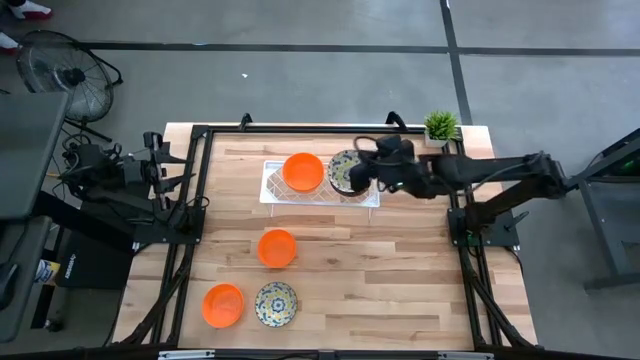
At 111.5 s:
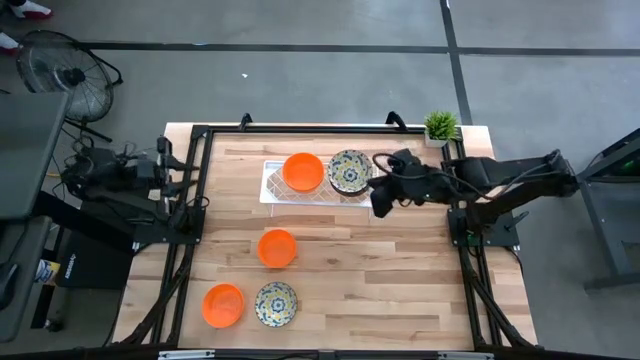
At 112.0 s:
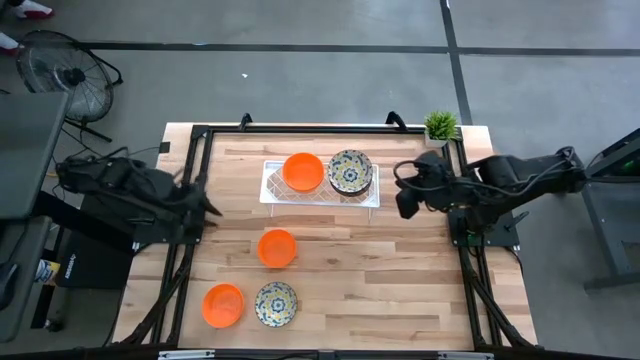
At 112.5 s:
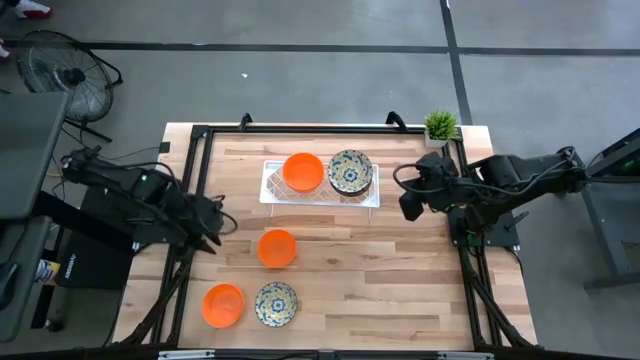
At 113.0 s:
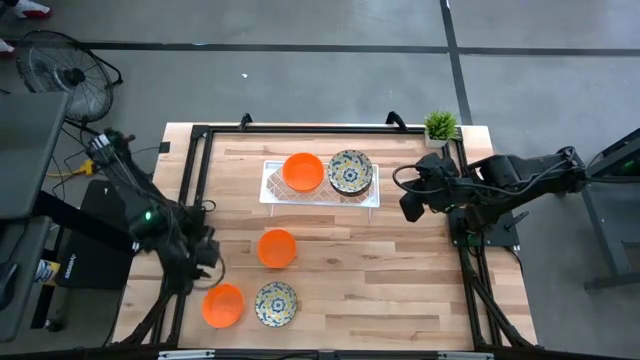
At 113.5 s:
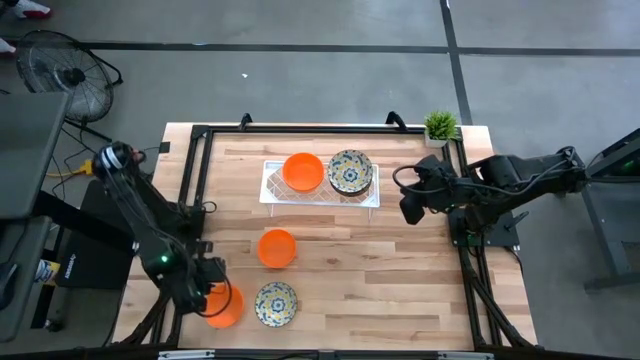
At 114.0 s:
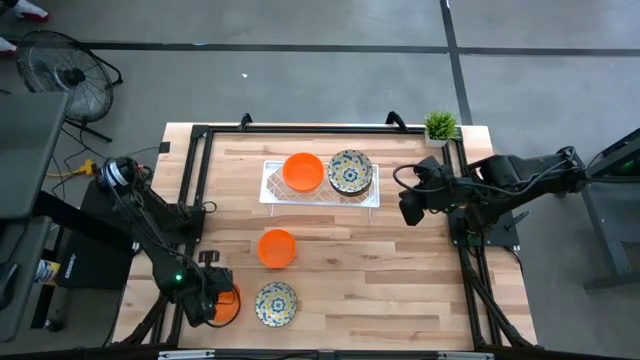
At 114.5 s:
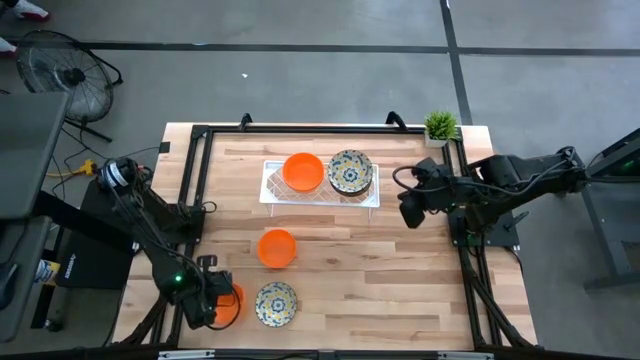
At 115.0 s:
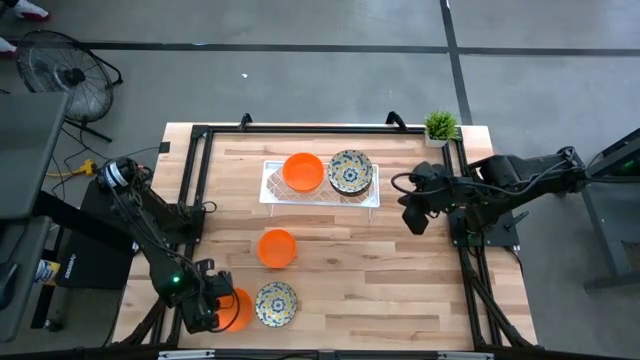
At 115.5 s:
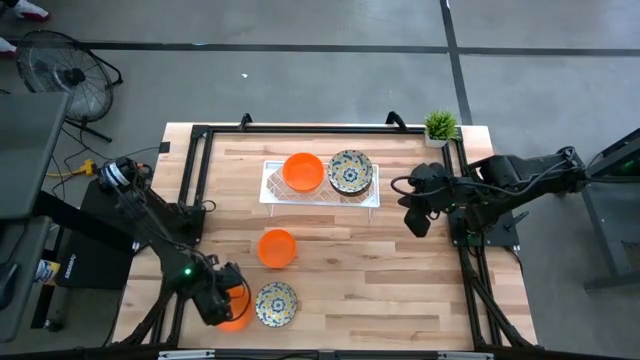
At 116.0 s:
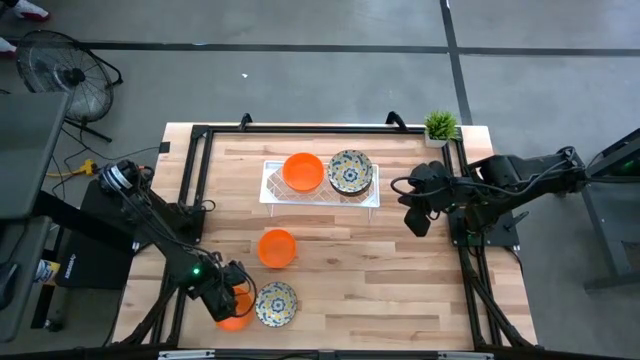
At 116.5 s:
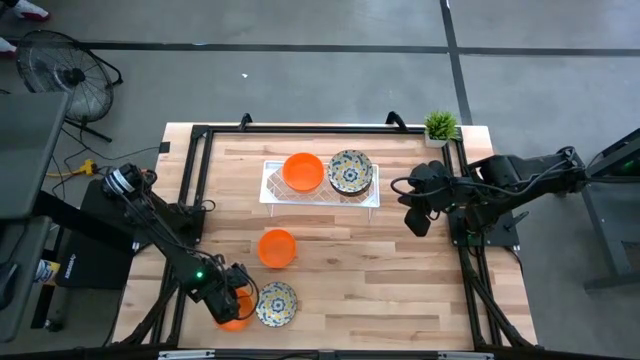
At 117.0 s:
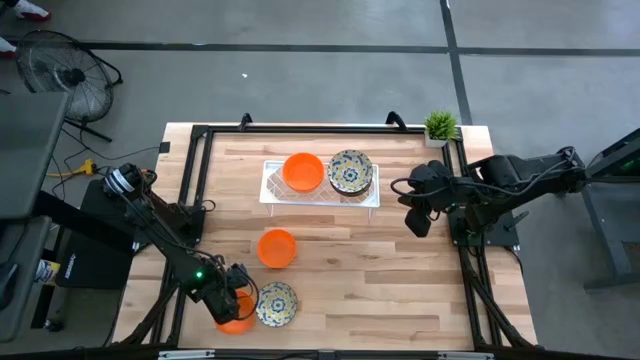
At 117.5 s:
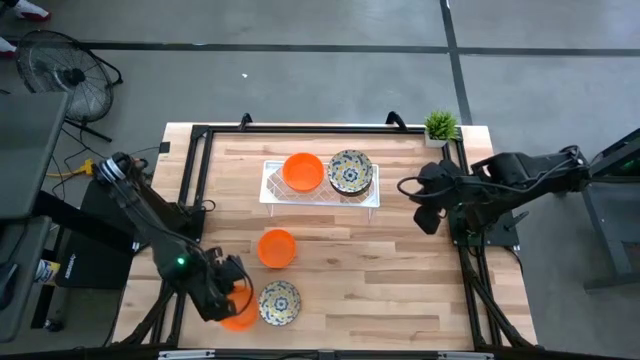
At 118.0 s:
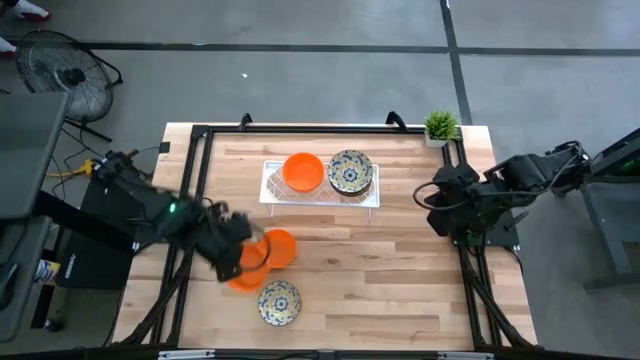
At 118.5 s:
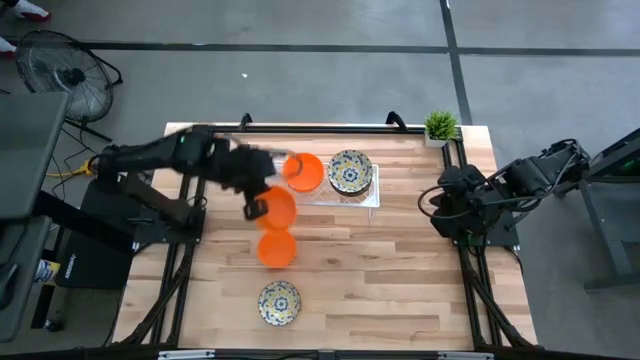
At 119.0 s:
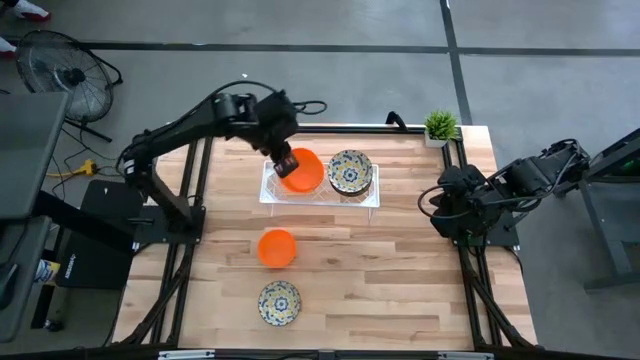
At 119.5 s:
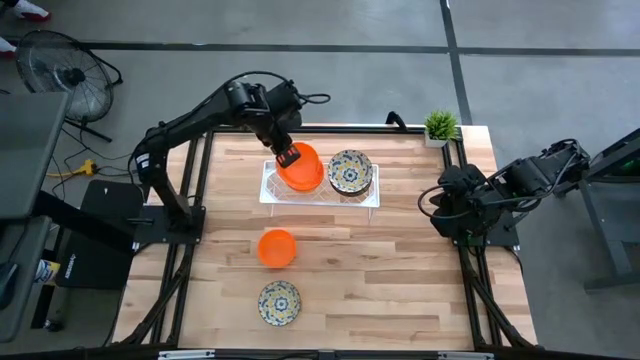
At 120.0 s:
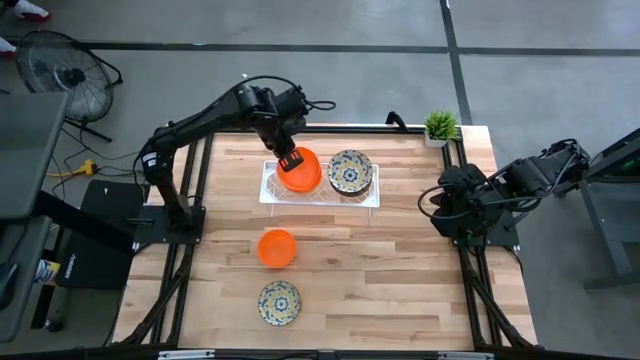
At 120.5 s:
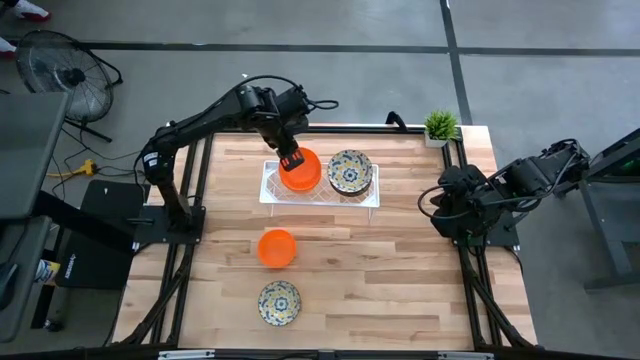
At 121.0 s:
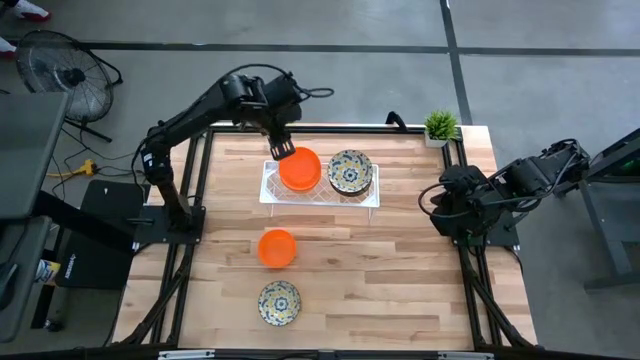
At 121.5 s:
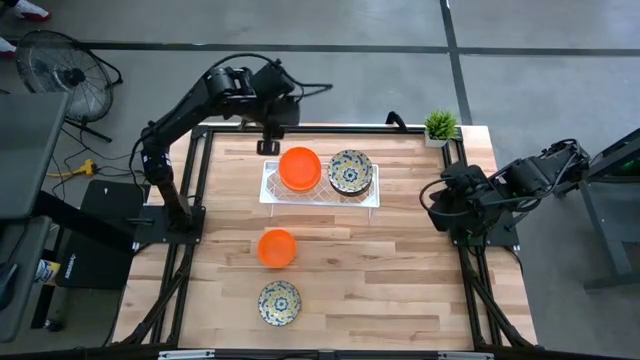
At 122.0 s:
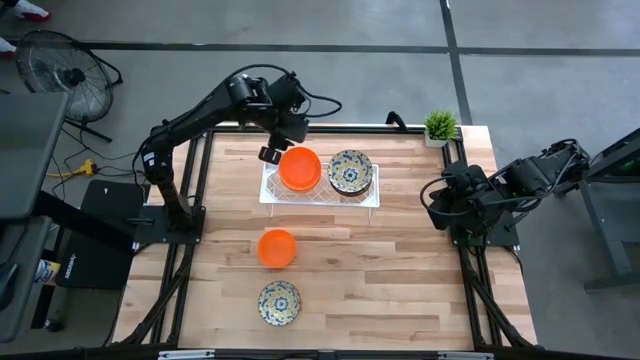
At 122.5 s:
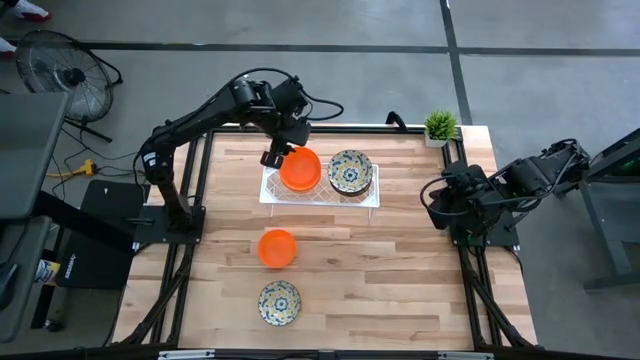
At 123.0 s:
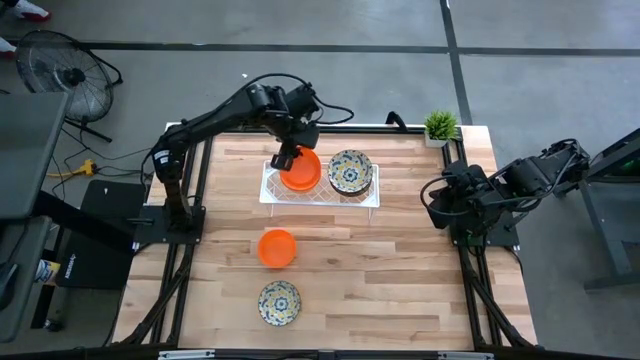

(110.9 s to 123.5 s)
Task: Pick & Place Mini bowls
Stack the orange bowl on top of the other orange bowls on the shelf

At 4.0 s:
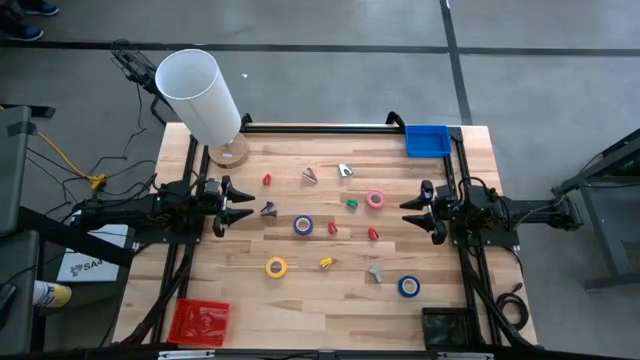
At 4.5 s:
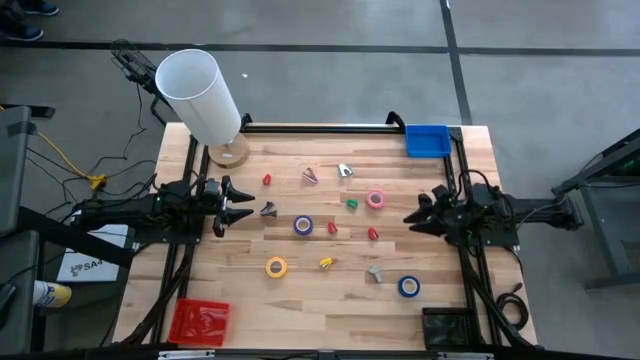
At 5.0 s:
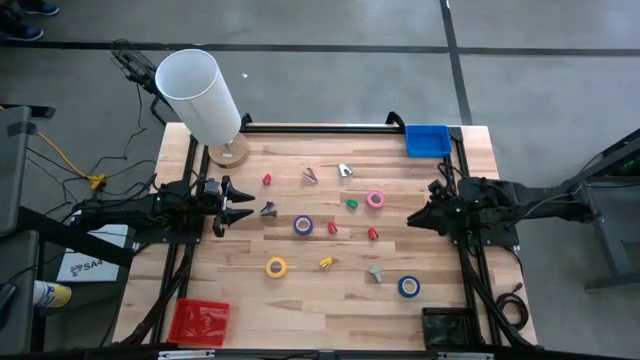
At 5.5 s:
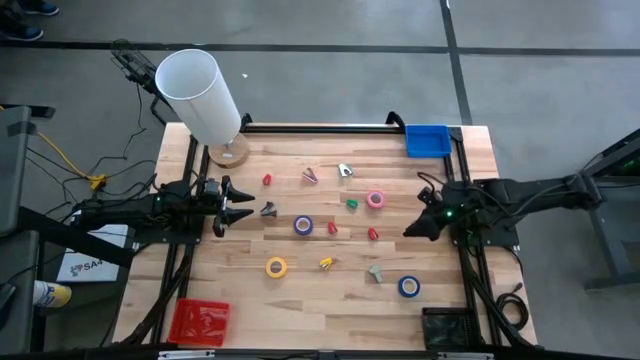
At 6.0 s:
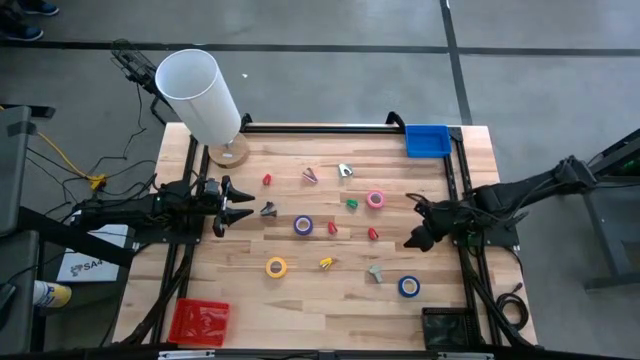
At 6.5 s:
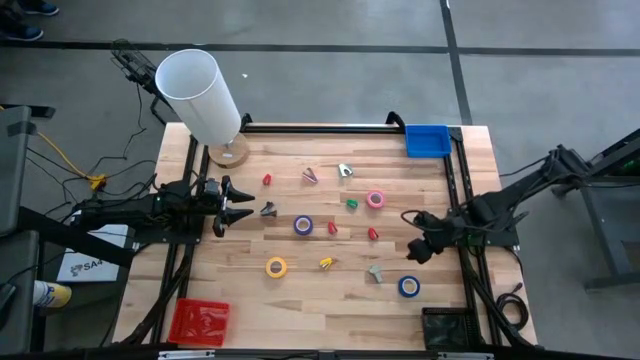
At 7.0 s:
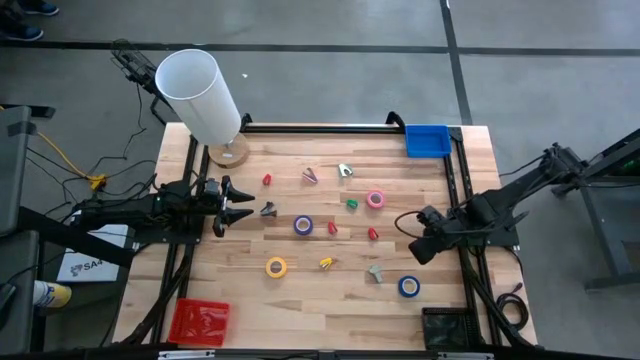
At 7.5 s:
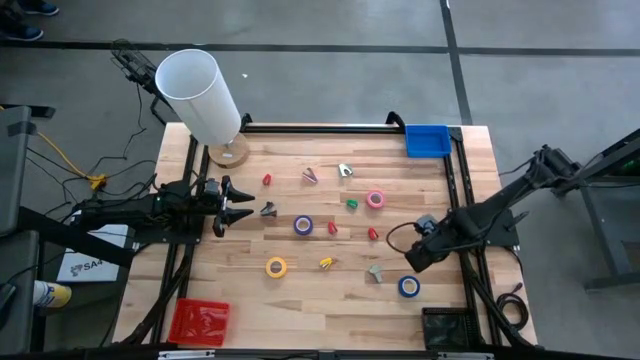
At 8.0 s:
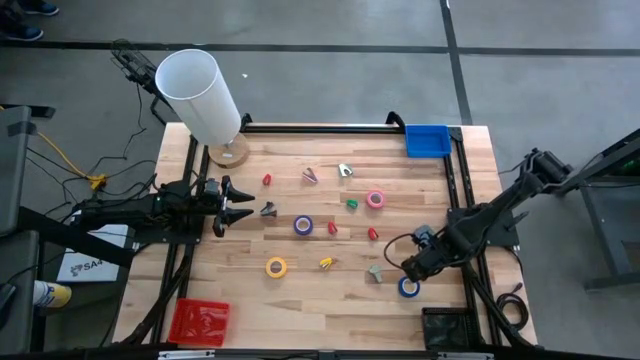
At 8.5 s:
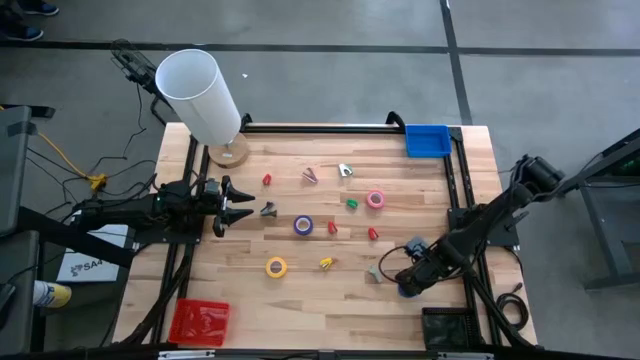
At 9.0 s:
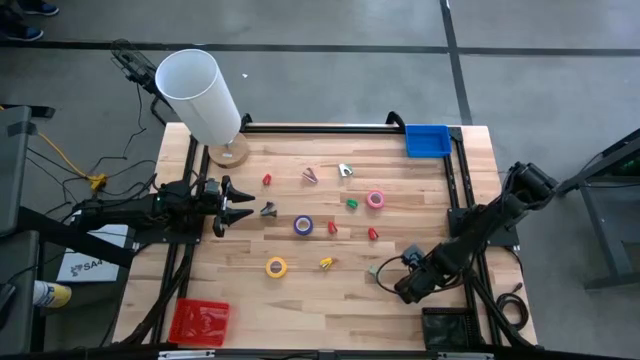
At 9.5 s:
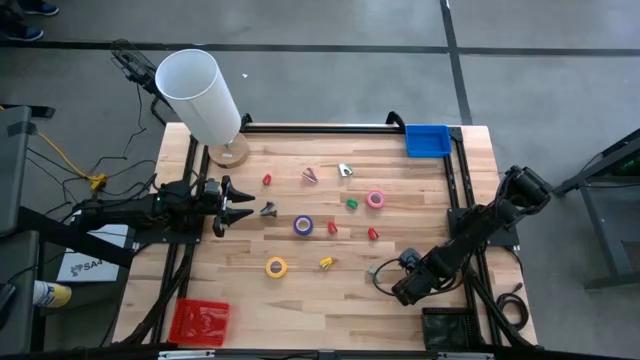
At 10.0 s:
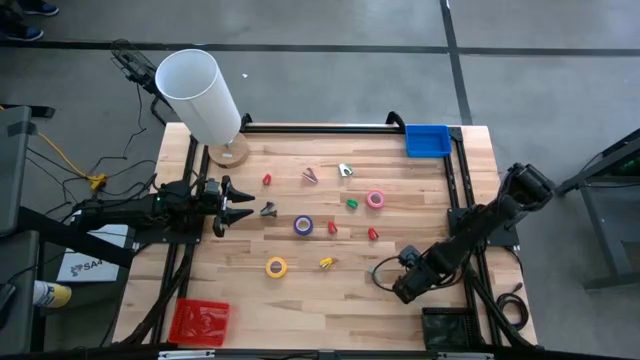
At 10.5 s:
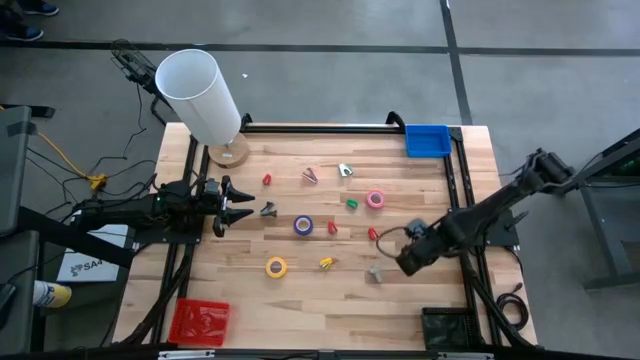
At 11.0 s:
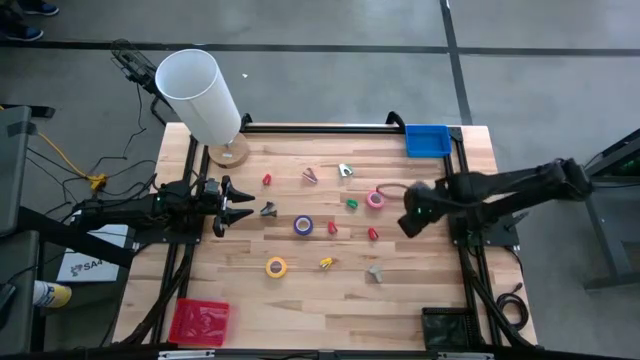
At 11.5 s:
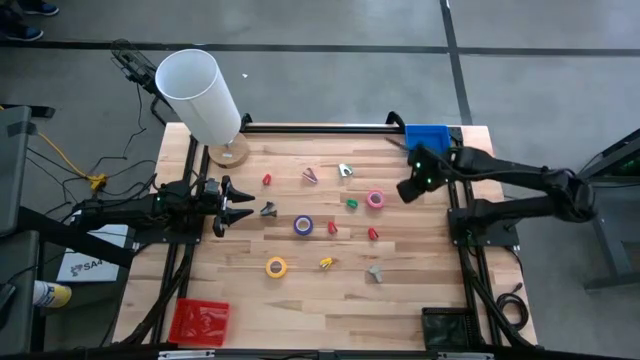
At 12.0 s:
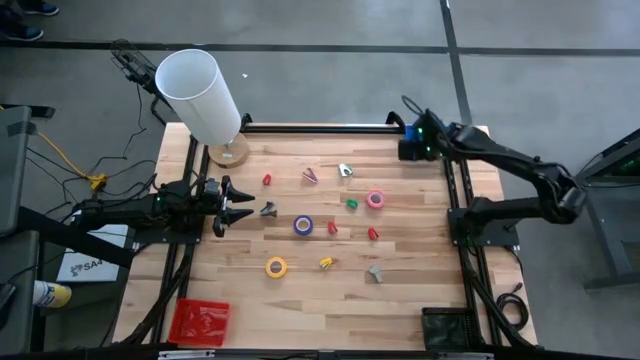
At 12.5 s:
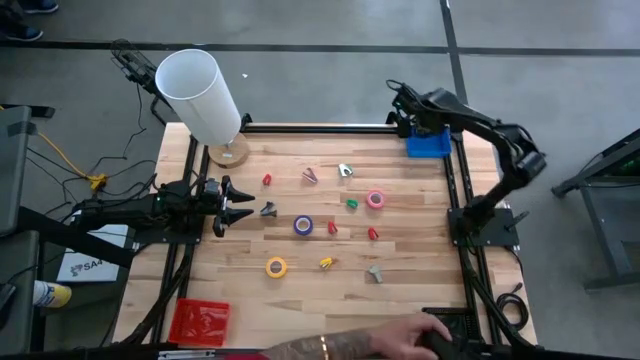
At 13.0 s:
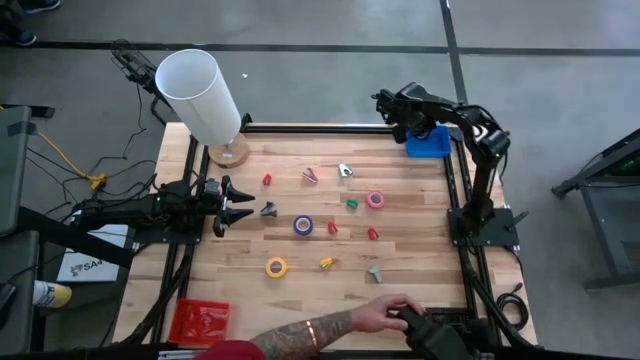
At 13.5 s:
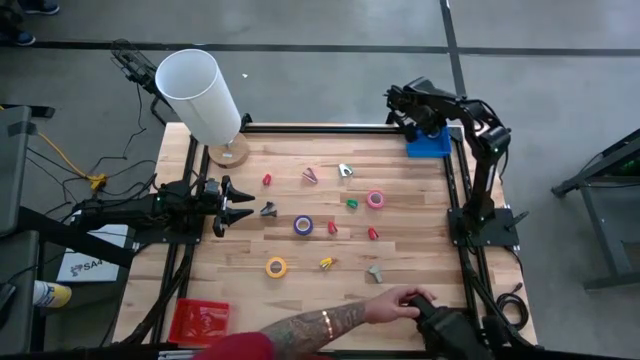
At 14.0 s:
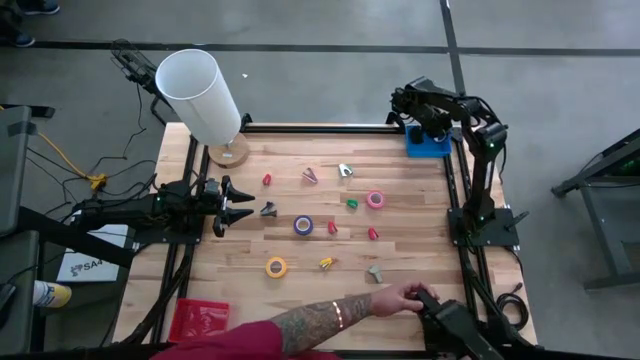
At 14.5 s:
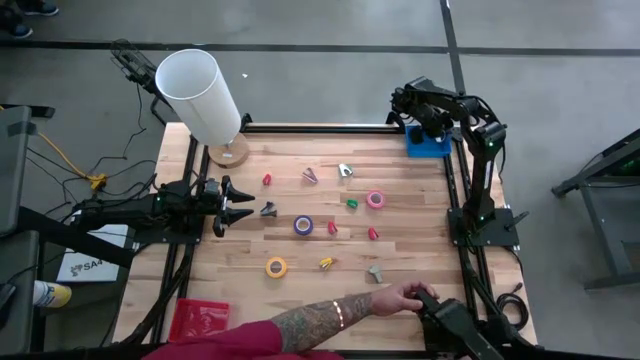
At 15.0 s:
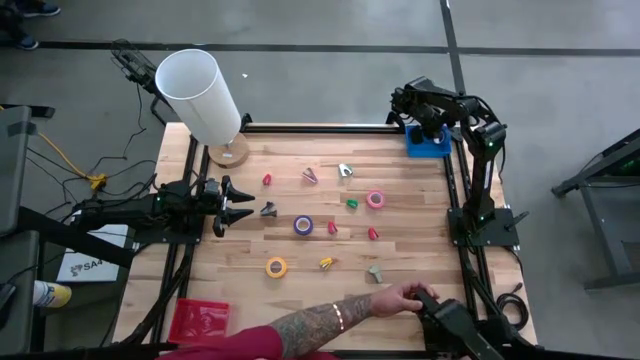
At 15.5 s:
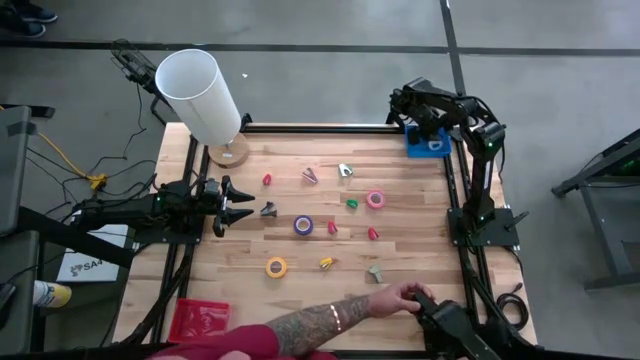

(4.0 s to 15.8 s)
Task: Pick and place Stapler, Stapler remover, tape
Put the bottom blue tape into the blue bin
